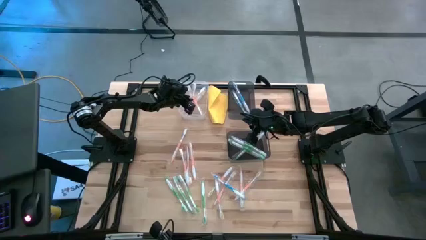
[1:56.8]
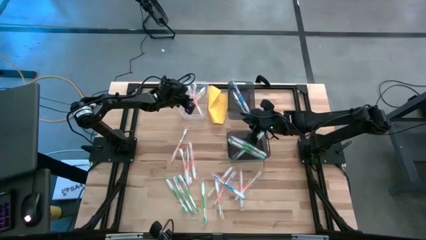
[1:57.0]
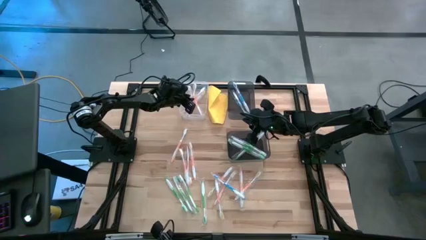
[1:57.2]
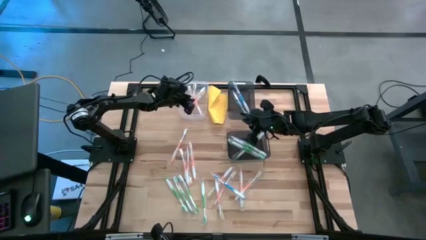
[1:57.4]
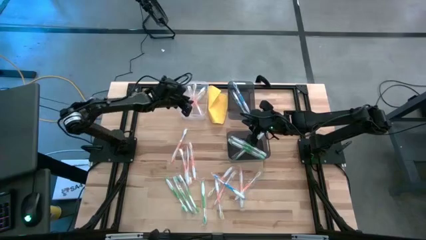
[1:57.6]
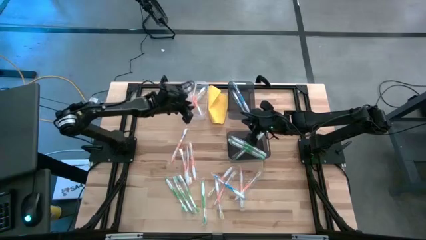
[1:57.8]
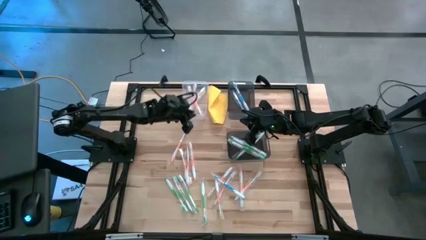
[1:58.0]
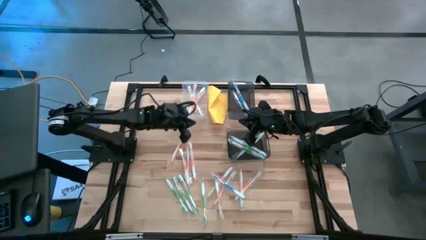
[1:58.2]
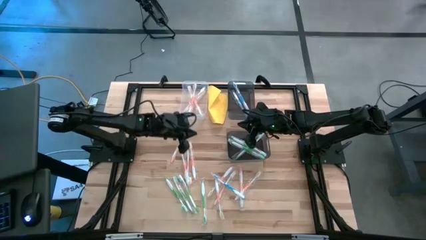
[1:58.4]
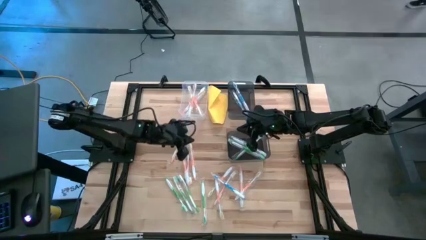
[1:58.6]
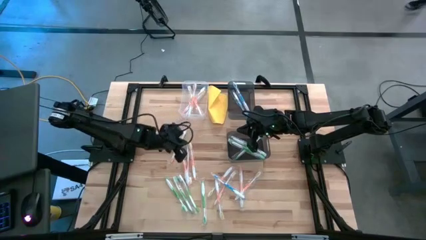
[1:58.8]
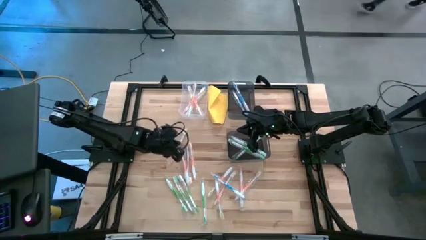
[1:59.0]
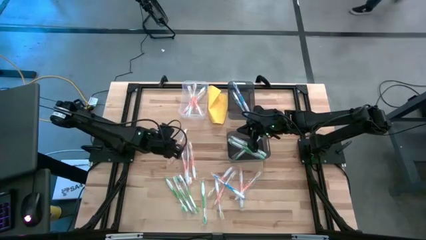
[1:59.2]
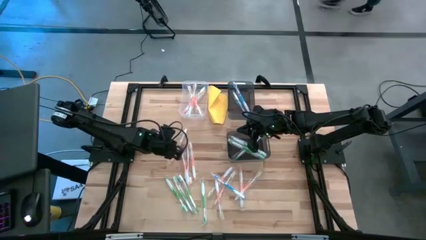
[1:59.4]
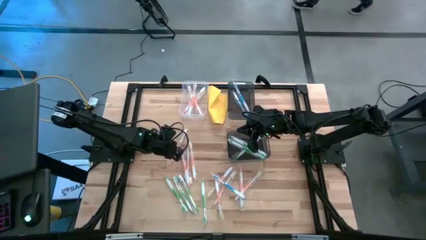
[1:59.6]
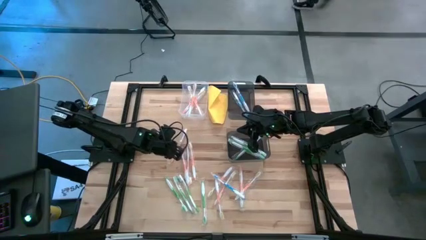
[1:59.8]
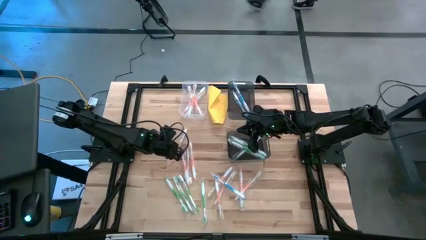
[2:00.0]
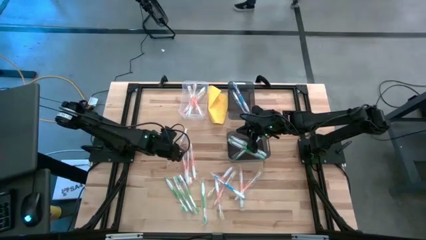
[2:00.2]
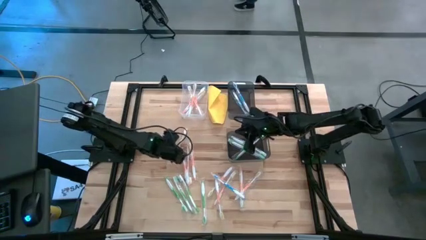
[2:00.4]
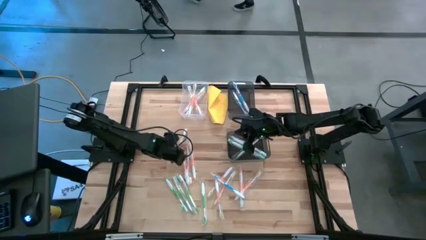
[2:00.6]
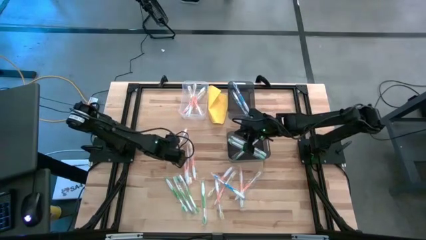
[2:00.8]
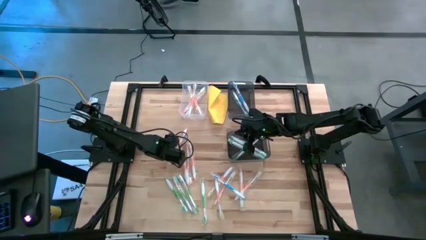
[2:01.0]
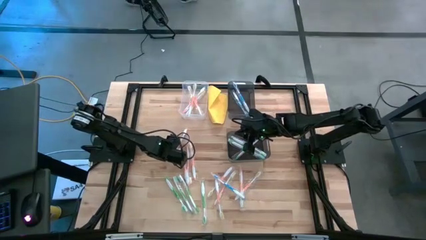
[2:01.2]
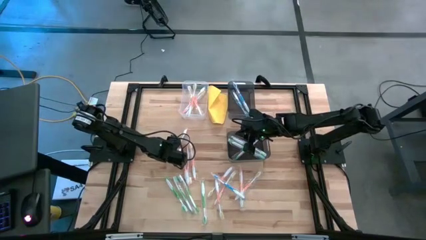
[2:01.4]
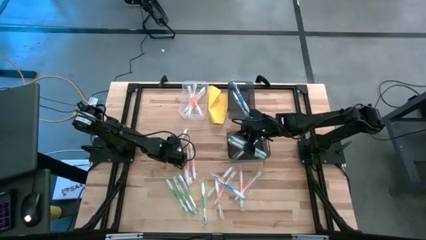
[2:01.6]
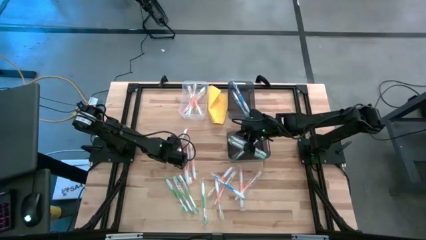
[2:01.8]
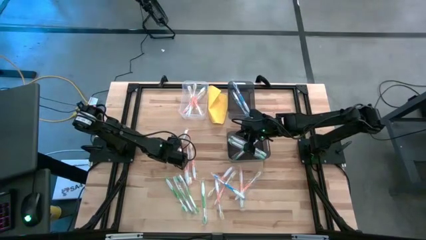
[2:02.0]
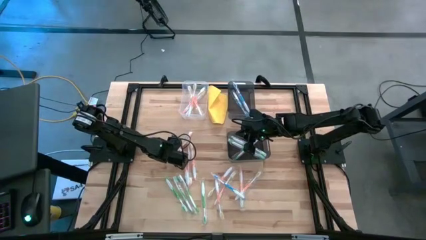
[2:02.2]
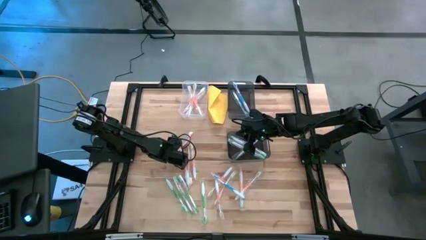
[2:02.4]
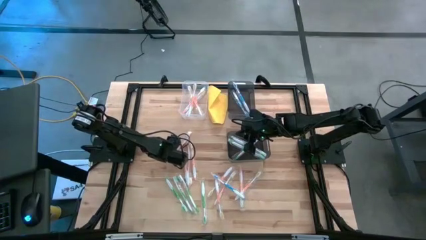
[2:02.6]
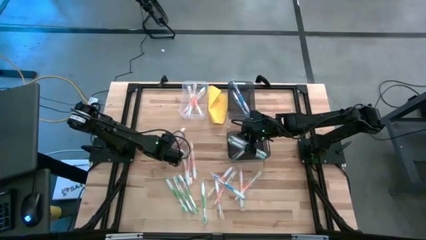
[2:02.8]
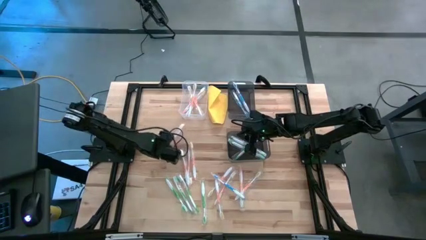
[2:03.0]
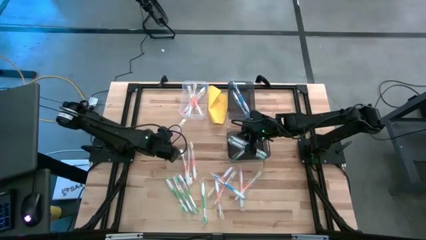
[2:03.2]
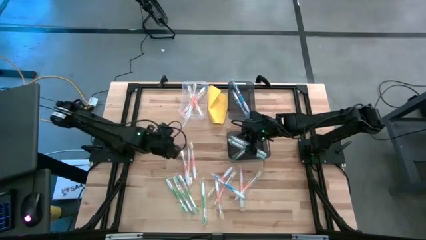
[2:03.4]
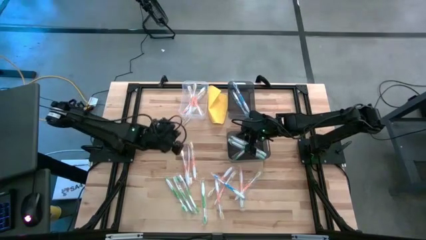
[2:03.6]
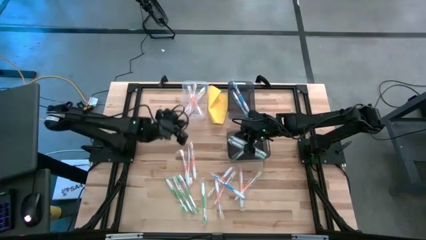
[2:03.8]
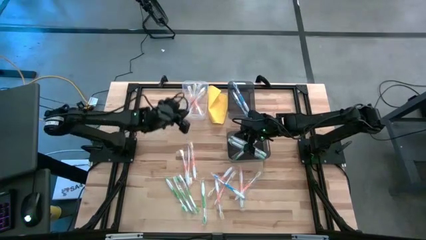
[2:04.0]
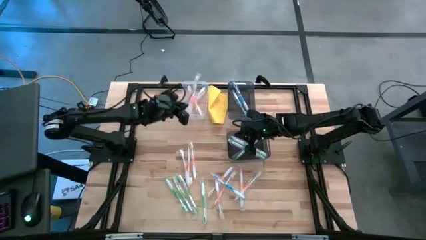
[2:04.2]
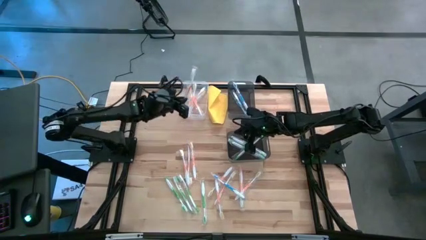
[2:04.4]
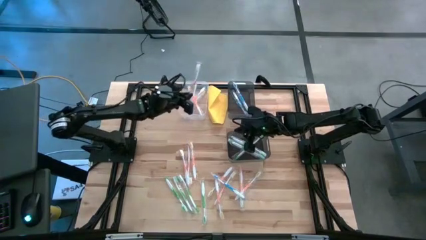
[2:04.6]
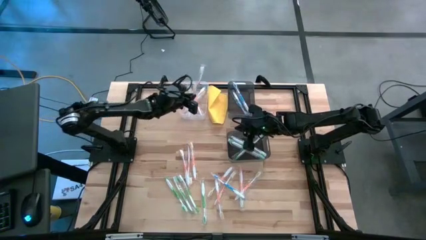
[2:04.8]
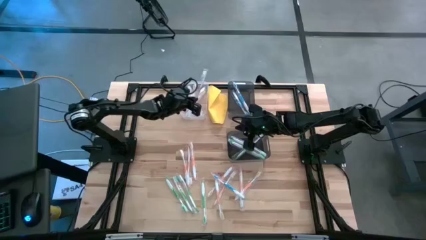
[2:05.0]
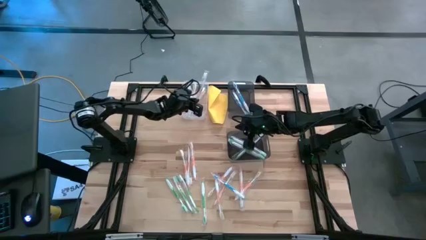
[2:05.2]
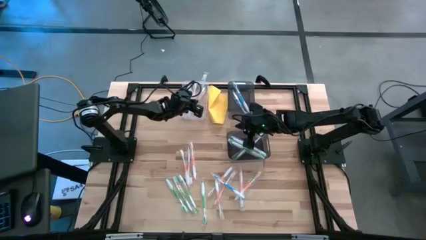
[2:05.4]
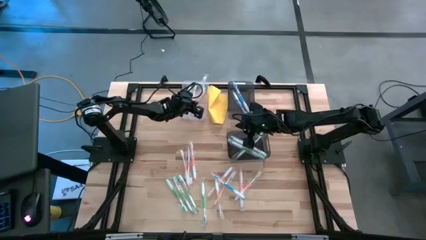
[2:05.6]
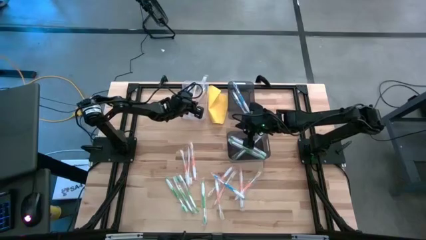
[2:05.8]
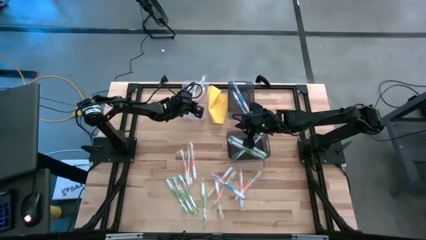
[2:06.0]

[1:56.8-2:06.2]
Task: Pick & Place Toothbrushes
Put the orange toothbrush into the transparent bin

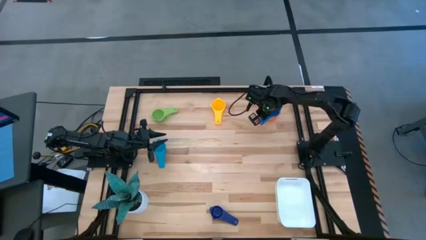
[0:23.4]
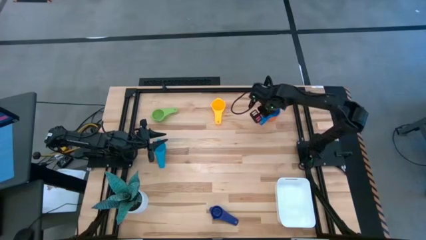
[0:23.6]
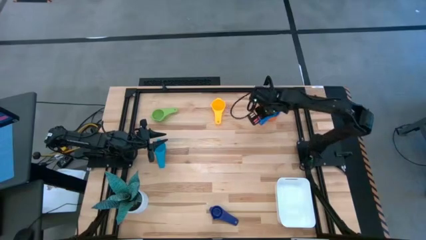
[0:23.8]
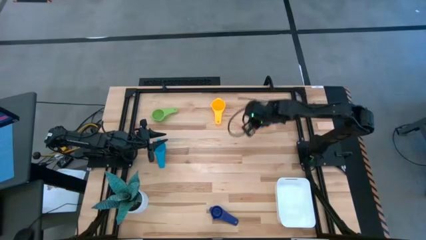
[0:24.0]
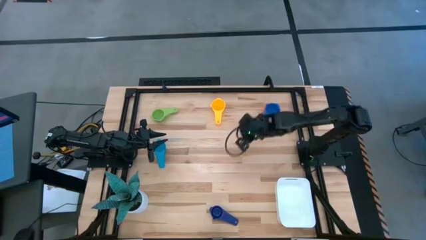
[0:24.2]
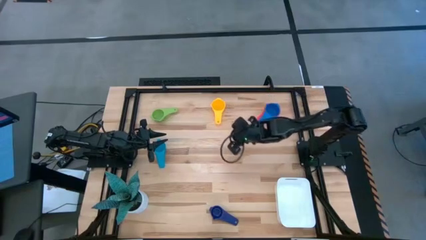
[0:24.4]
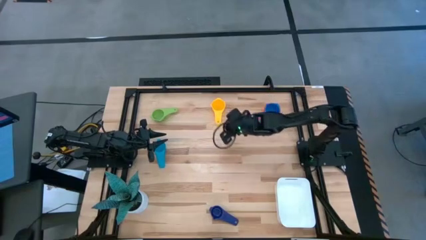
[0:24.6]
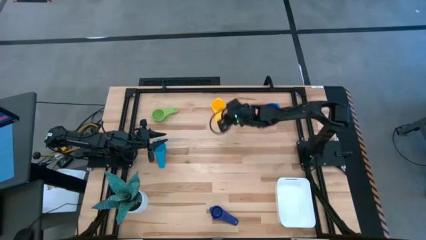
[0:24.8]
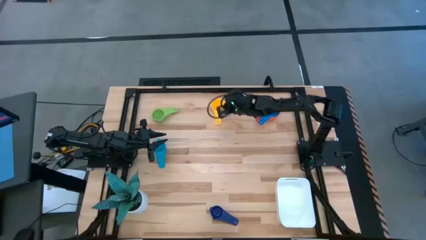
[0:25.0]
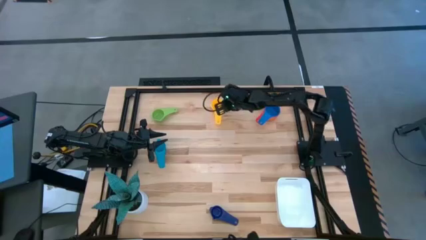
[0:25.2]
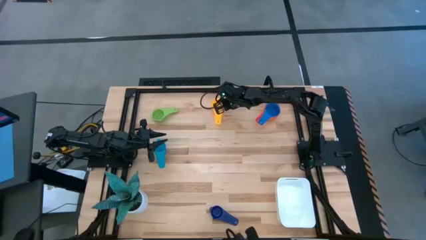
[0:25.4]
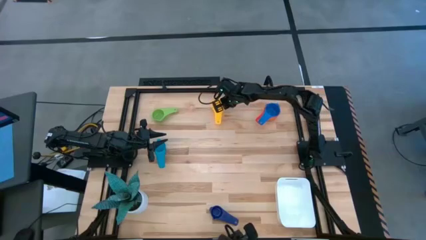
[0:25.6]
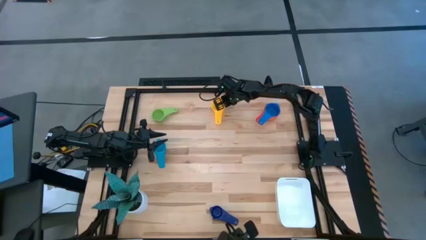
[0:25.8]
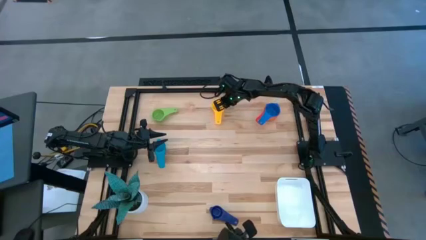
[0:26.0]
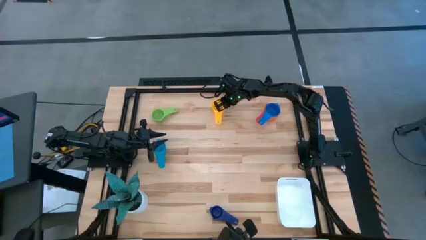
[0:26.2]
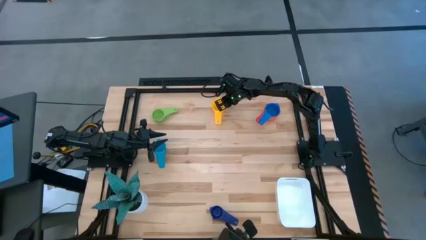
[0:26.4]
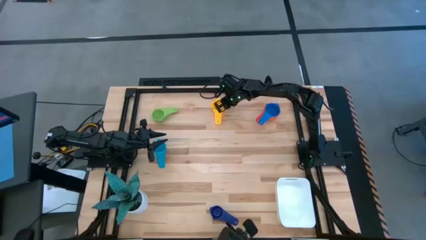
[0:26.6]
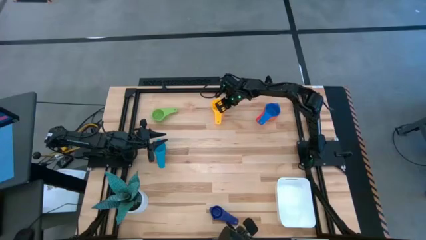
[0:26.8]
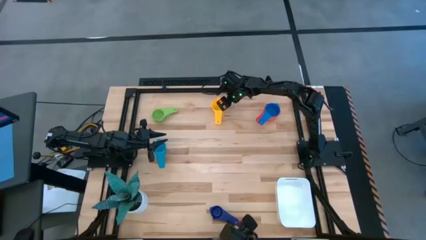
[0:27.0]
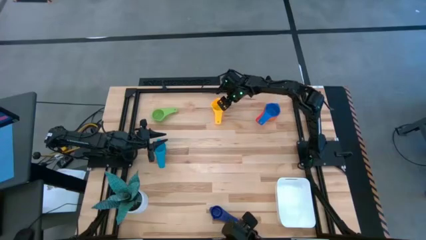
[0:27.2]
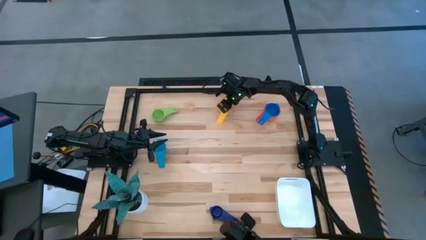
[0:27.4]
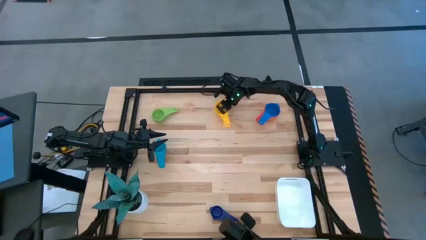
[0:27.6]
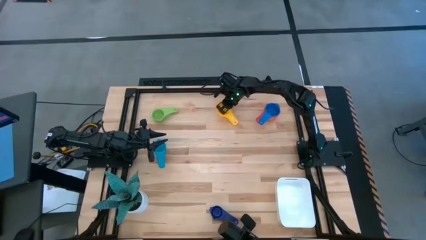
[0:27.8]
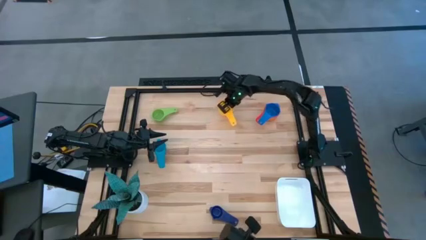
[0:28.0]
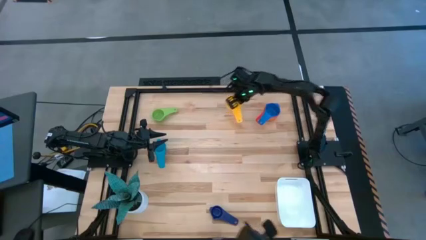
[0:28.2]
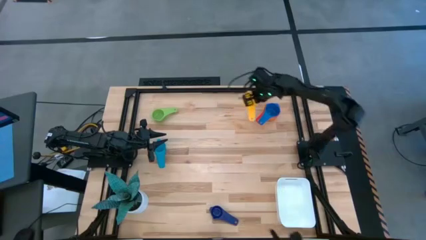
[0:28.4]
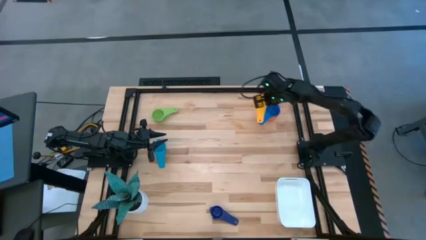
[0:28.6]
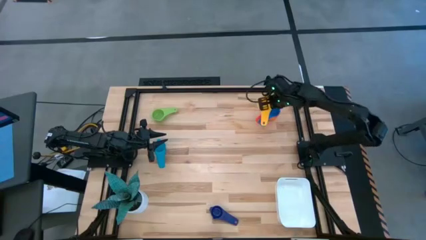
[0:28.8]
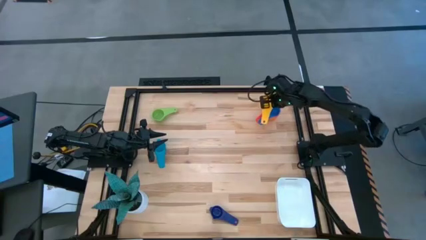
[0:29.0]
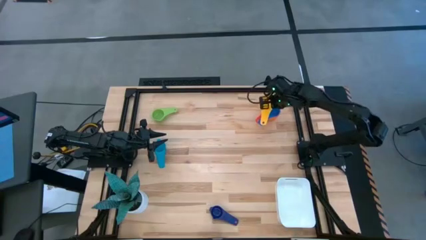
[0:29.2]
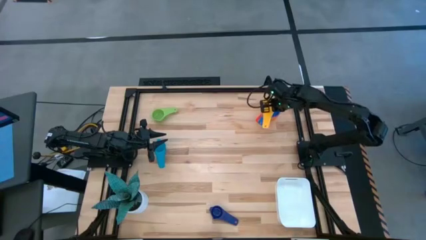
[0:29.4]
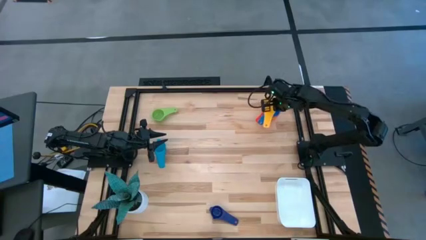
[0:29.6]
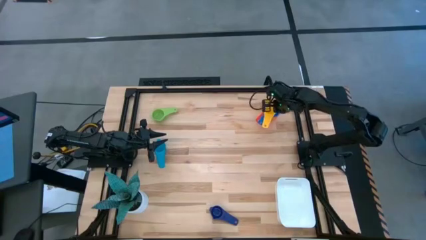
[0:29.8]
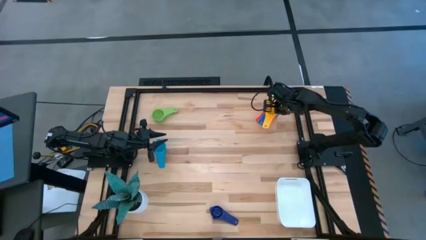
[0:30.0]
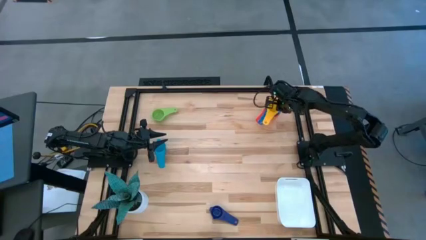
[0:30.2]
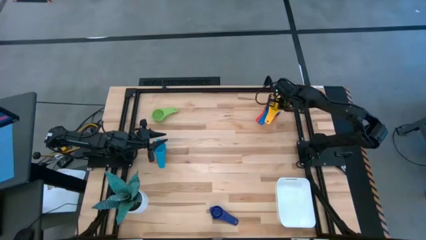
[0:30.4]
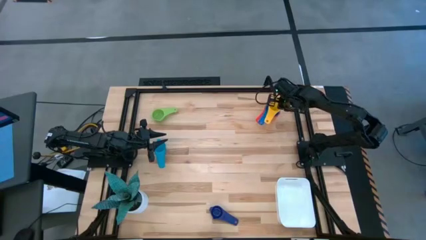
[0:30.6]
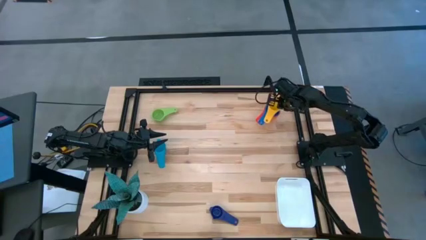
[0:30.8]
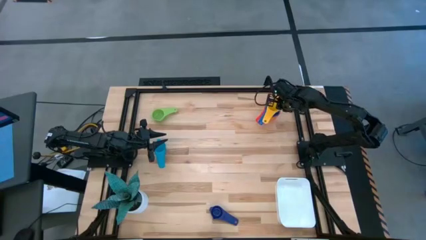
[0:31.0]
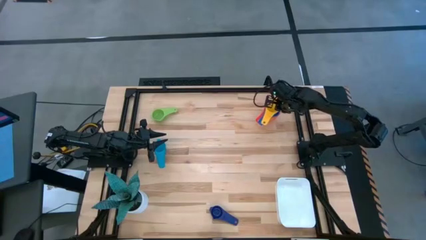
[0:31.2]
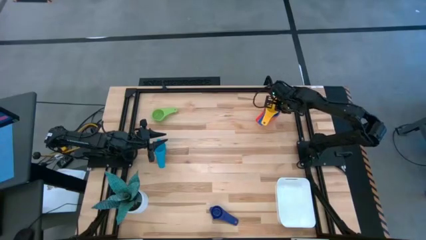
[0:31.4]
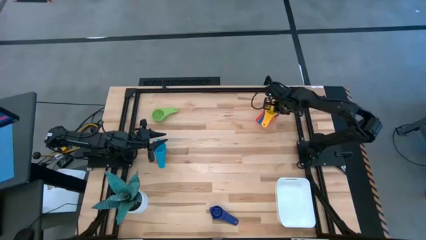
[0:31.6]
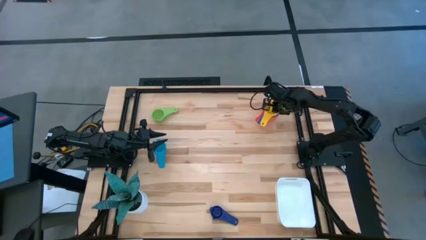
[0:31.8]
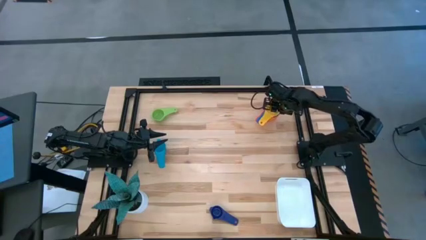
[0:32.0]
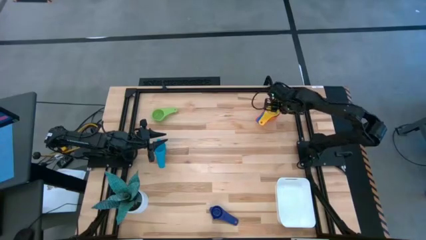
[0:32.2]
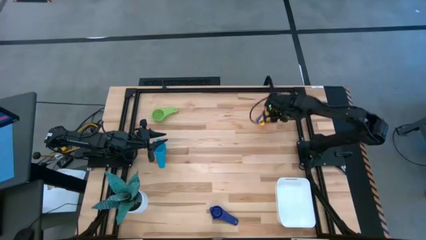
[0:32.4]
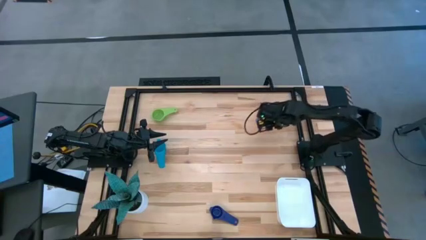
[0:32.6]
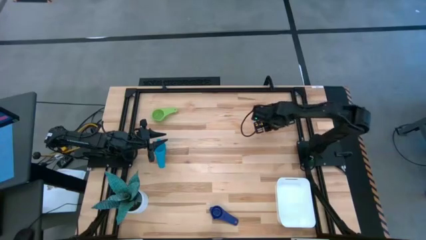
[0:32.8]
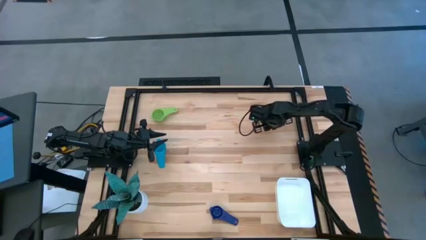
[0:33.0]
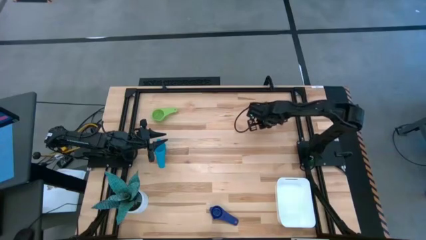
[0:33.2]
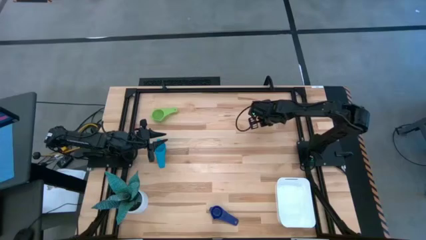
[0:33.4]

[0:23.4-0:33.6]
Task: Nest measuring cups in basket
Stack the yellow measuring cup on the blue measuring cup
